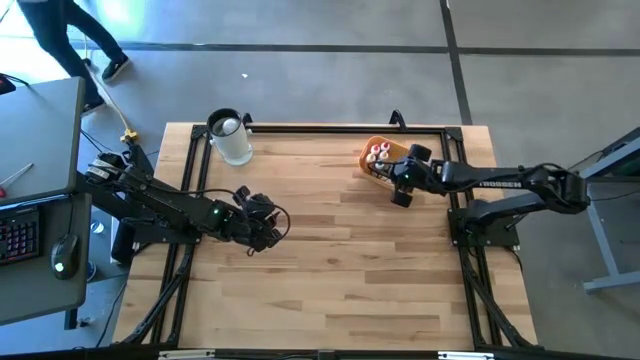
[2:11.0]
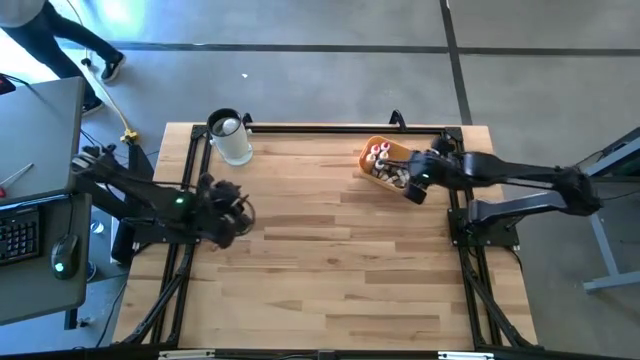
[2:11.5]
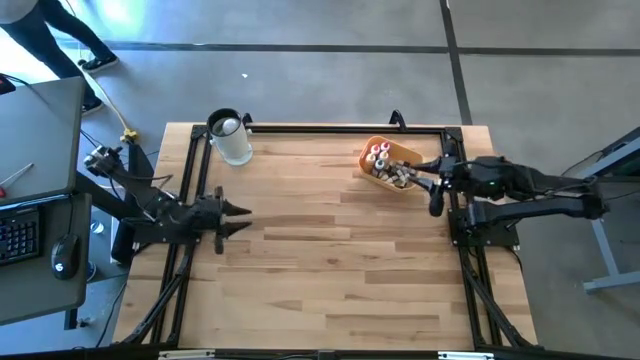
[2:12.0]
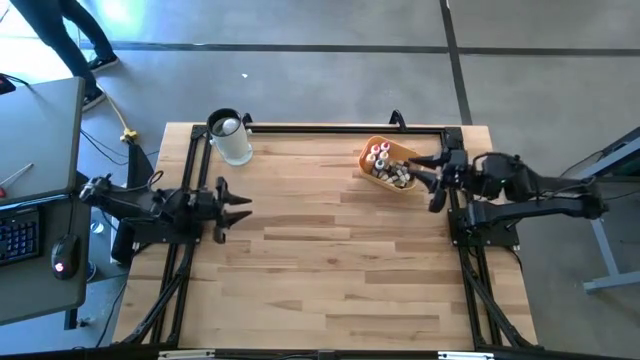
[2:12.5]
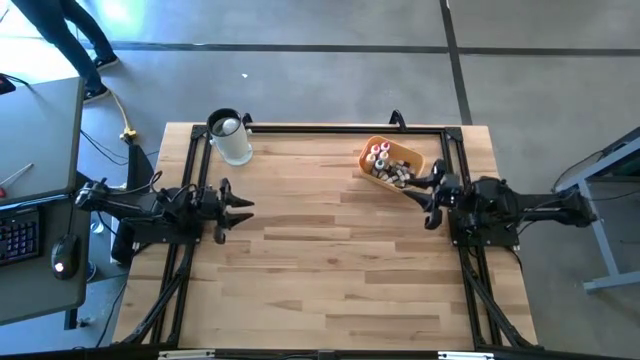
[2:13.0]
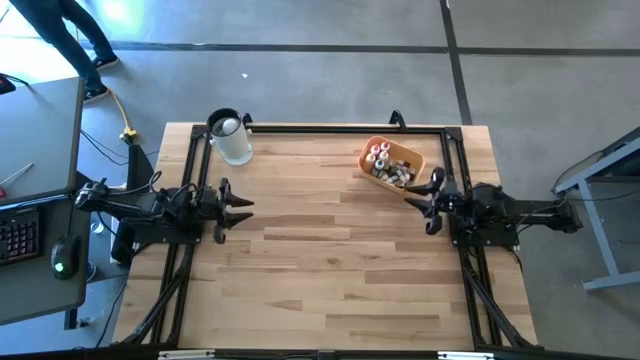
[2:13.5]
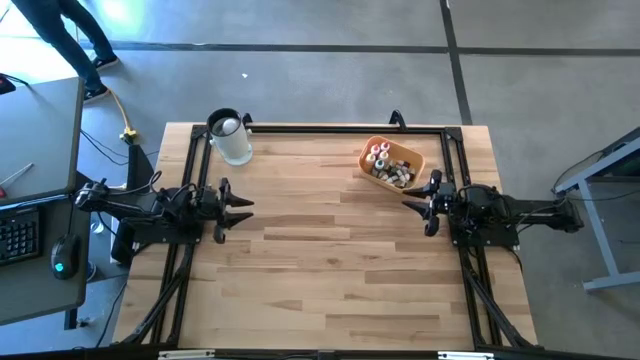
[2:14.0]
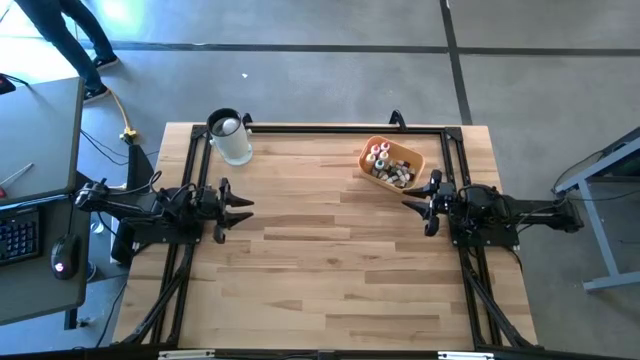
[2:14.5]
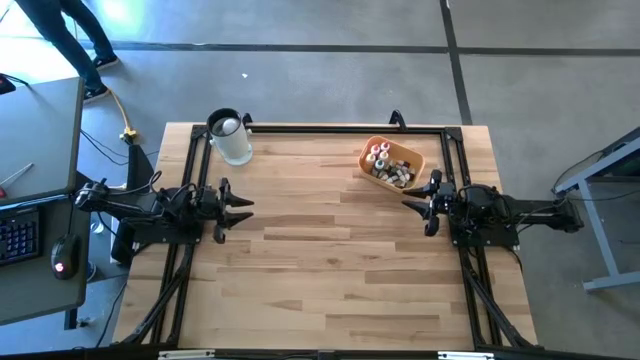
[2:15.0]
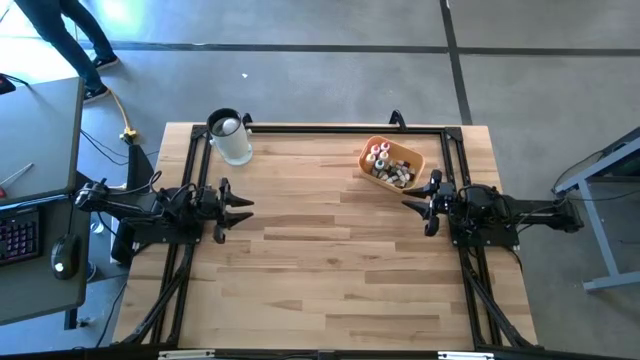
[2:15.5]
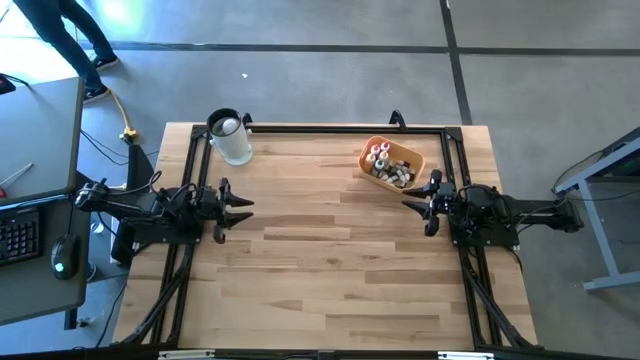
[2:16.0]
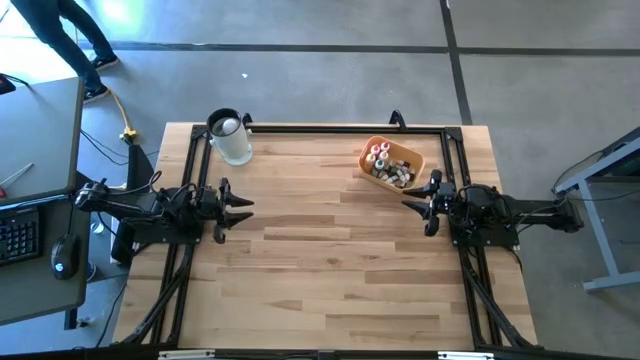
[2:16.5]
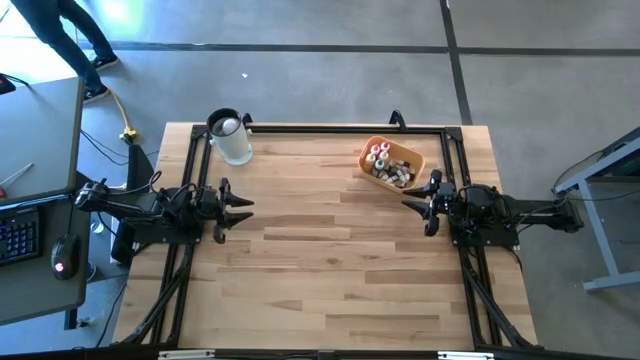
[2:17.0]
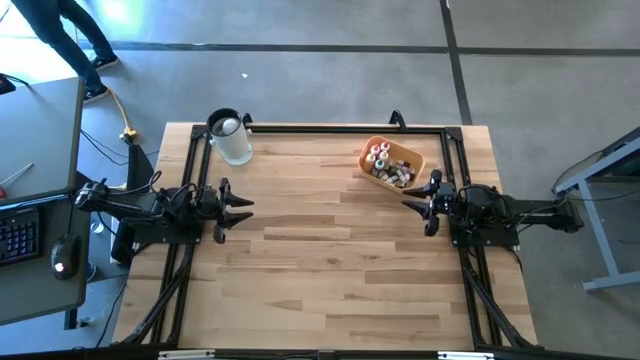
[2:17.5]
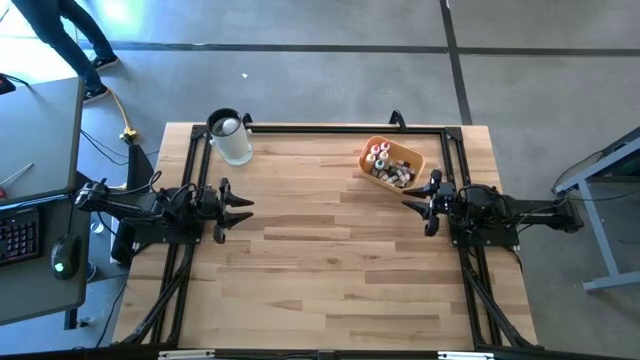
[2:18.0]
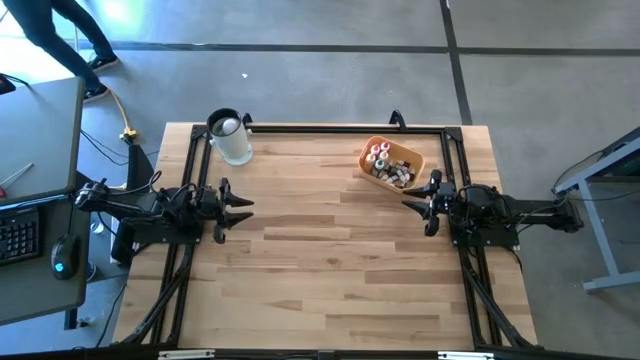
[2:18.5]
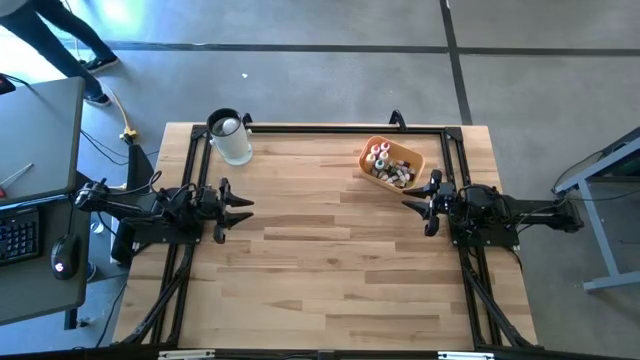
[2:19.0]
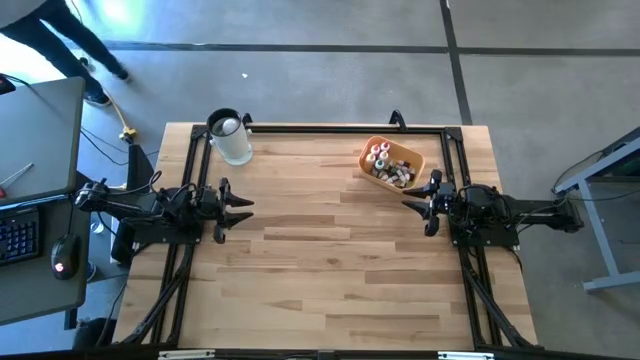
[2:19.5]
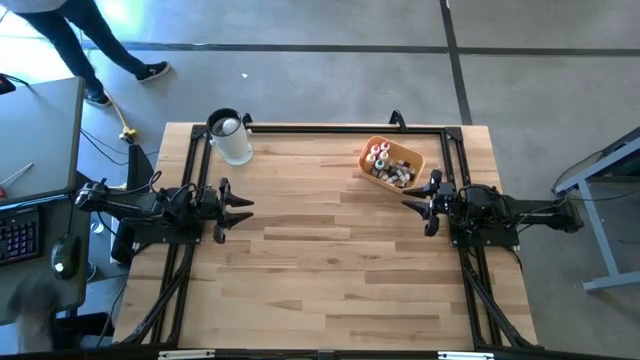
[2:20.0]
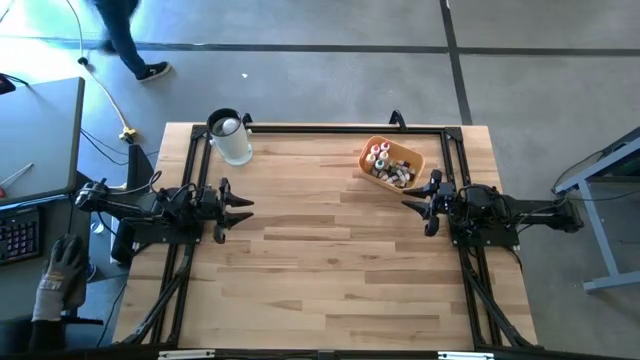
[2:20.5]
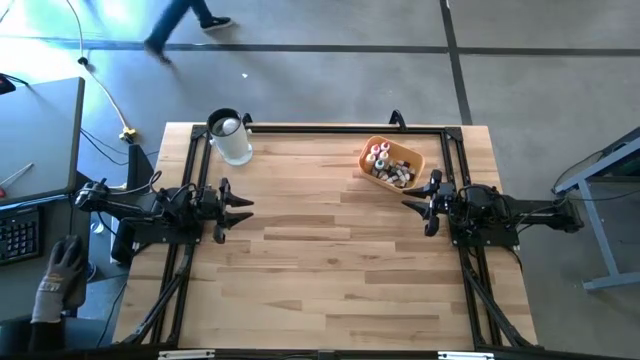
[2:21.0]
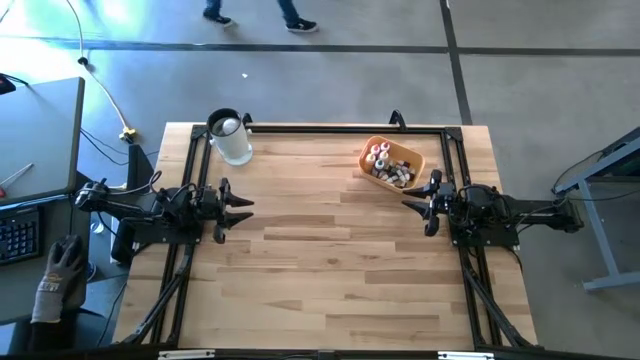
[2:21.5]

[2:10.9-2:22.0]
Task: Pick & Place food coloring
Return to Home Position

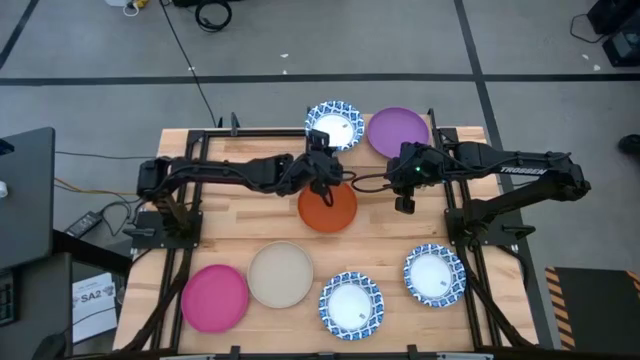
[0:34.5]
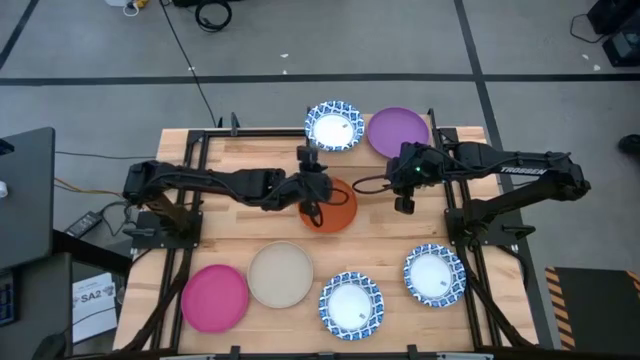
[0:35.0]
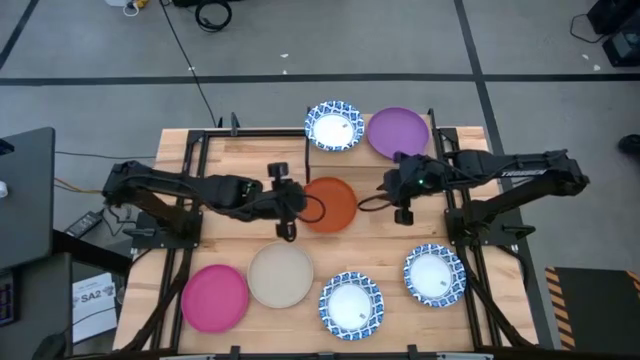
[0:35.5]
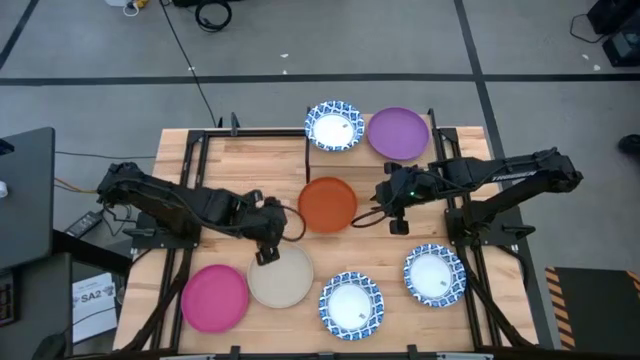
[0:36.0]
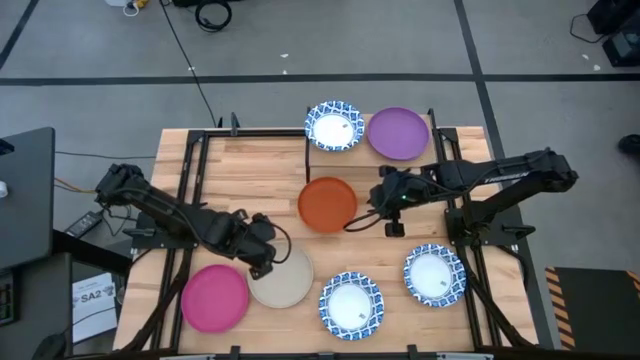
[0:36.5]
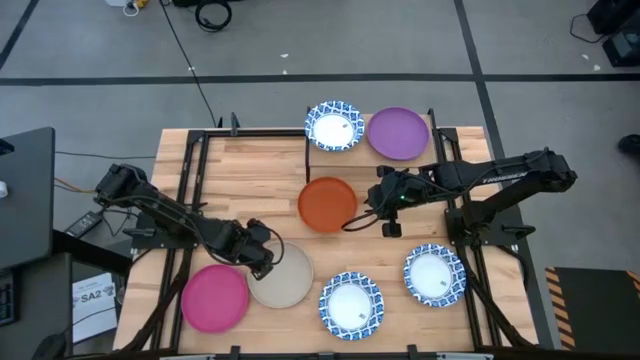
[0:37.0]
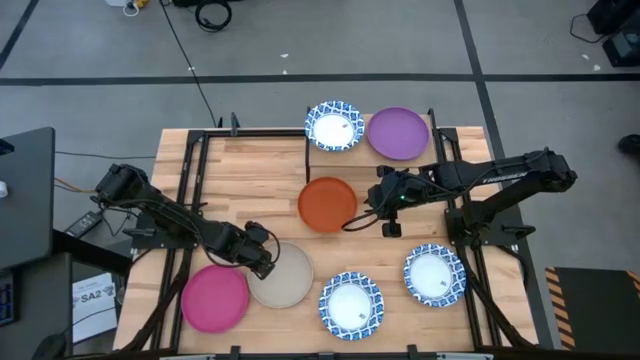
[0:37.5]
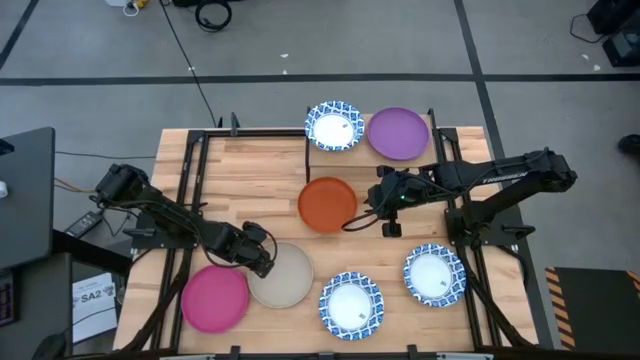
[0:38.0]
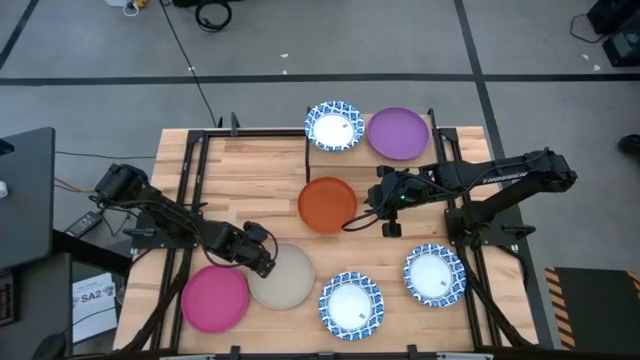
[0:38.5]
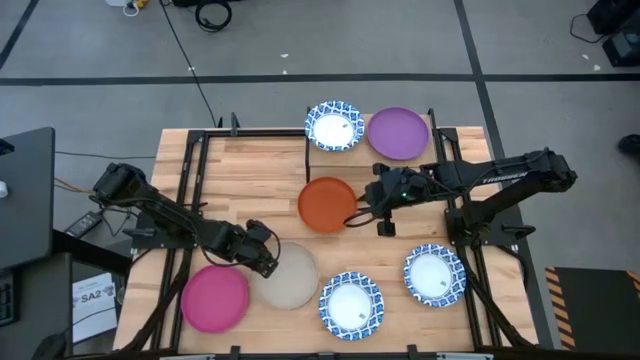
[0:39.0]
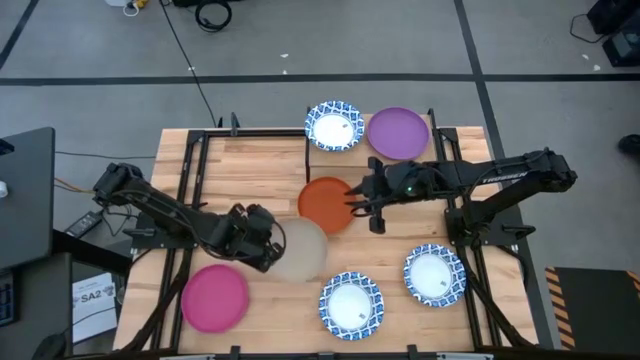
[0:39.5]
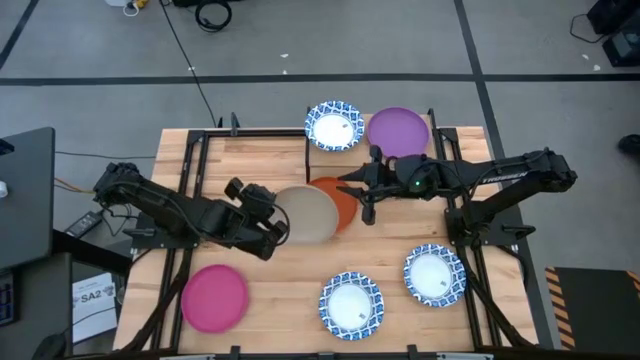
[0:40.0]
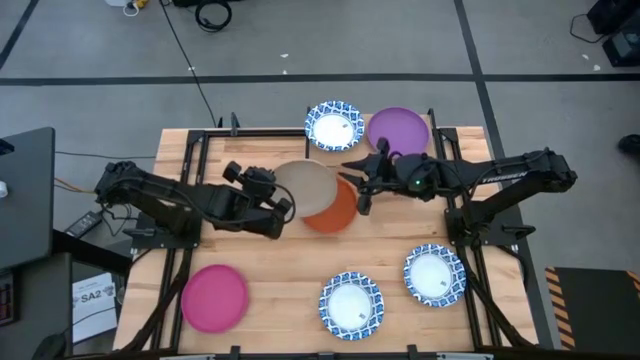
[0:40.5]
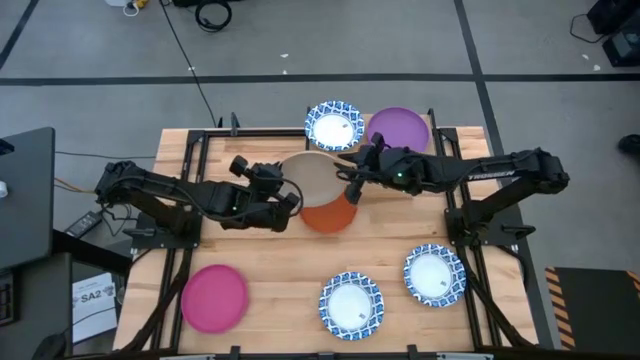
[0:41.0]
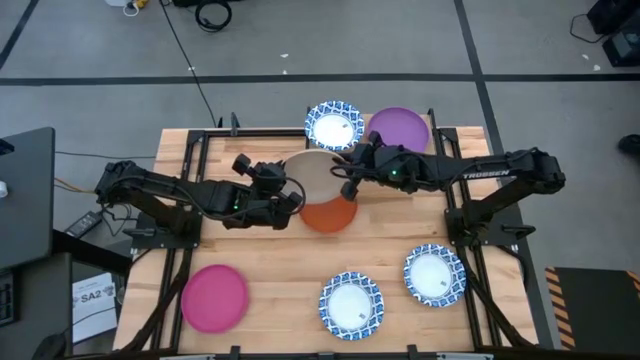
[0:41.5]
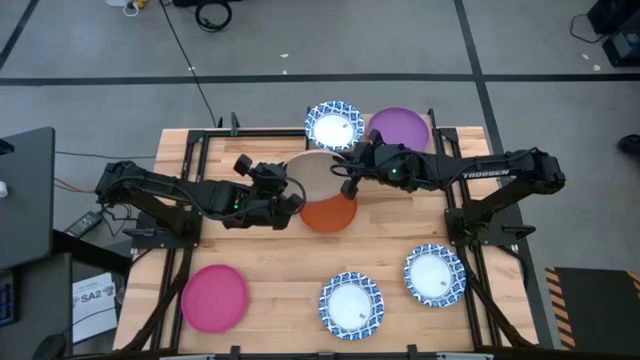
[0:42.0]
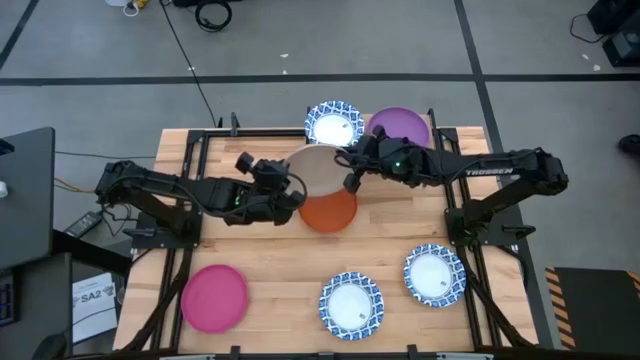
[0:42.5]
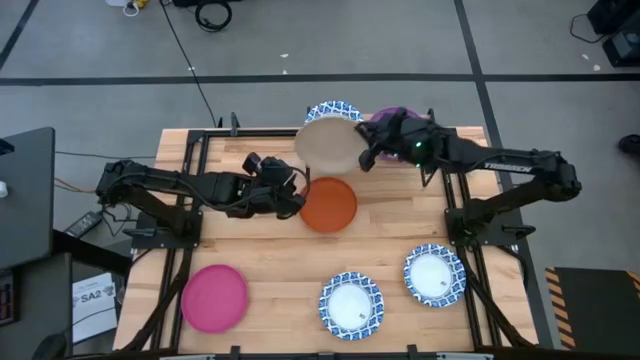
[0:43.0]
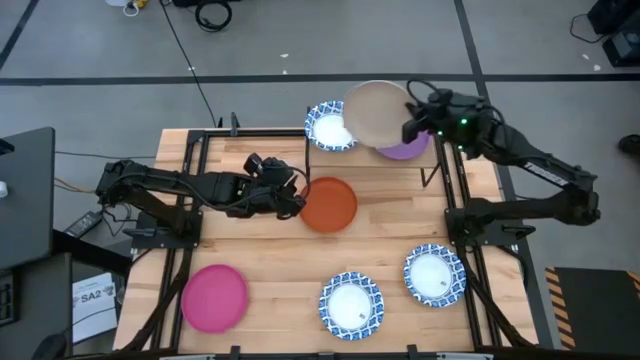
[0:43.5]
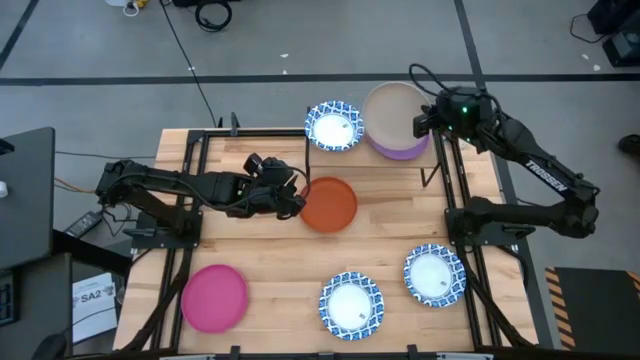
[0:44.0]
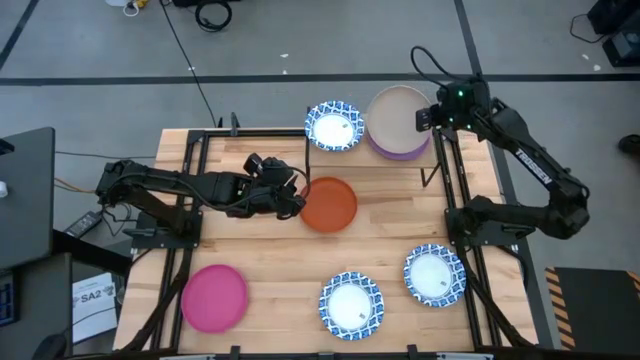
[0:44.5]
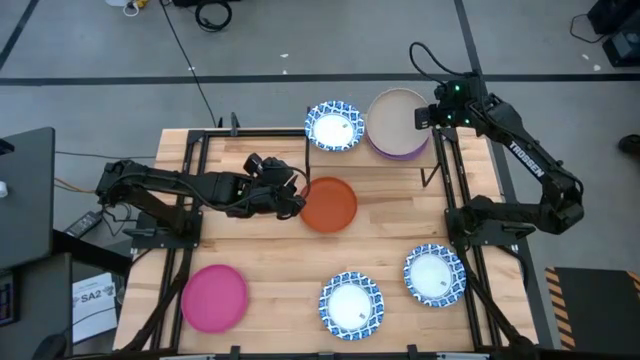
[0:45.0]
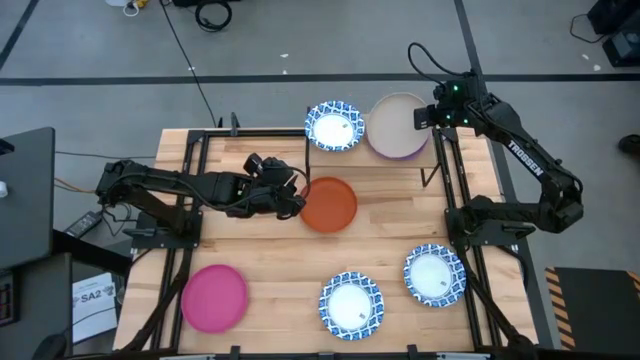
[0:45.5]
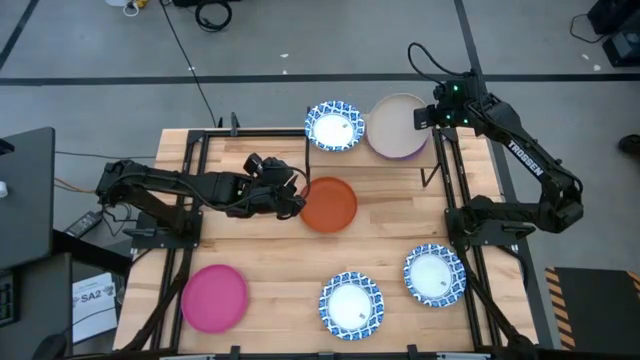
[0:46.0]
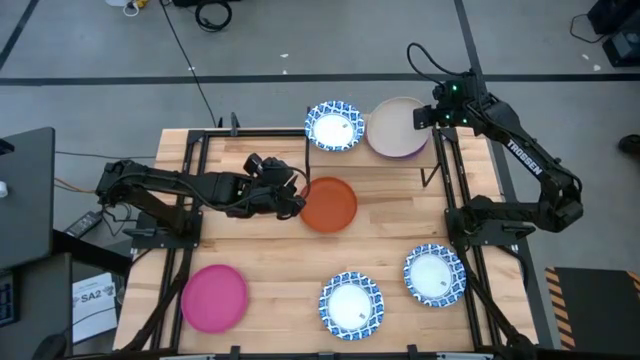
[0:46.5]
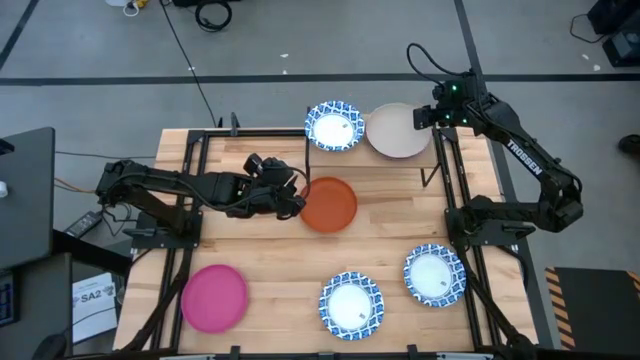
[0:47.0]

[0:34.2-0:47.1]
Task: Place and stack plates onto a shelf
Stack the beige plate on top of the violet plate on the shelf
